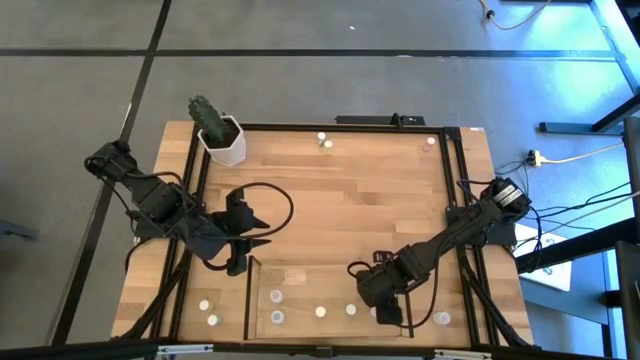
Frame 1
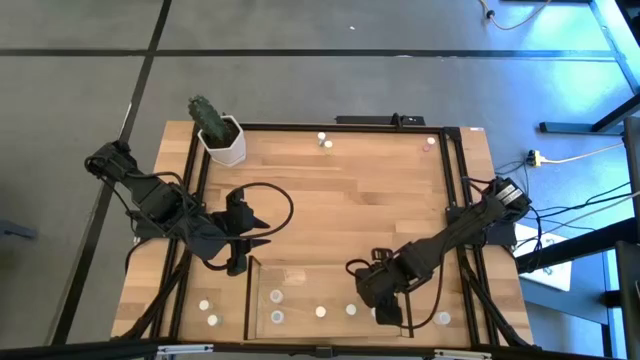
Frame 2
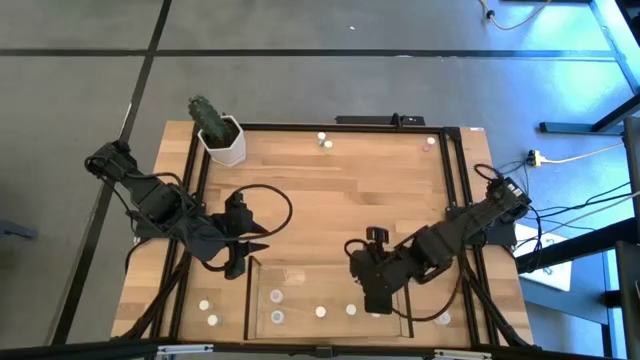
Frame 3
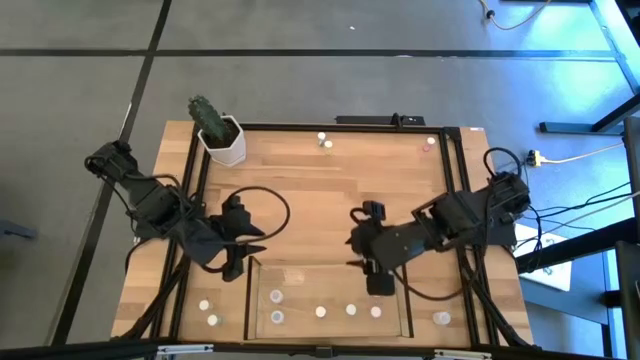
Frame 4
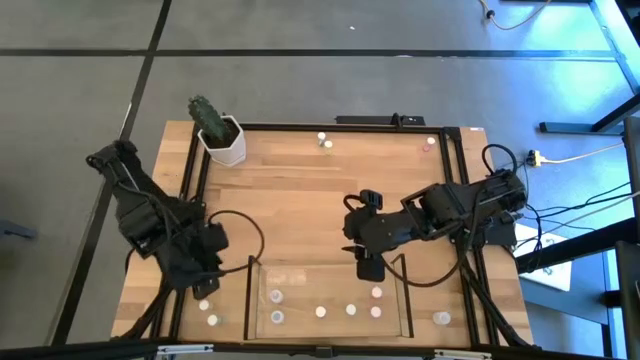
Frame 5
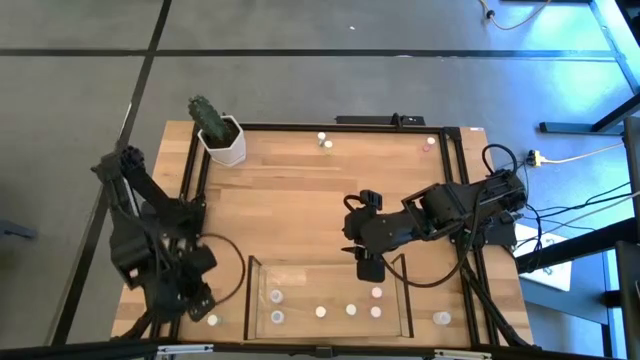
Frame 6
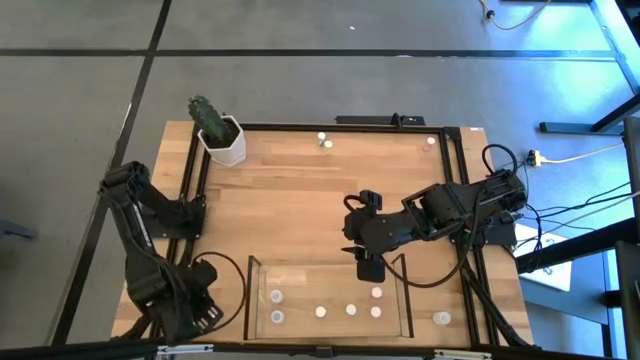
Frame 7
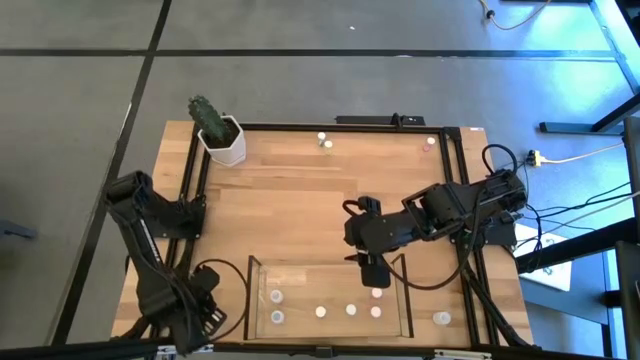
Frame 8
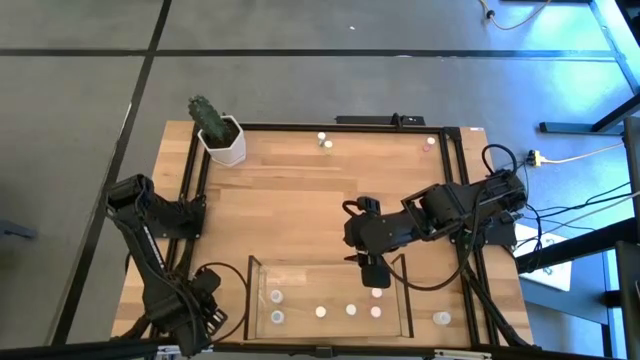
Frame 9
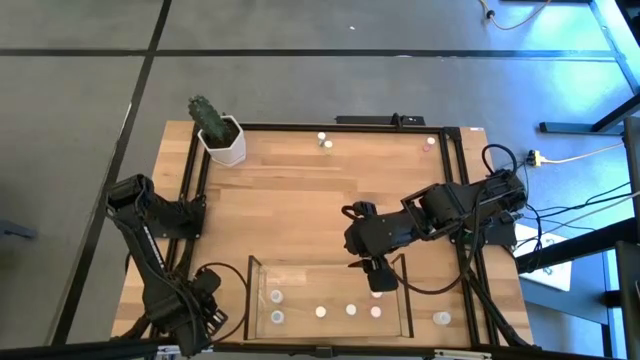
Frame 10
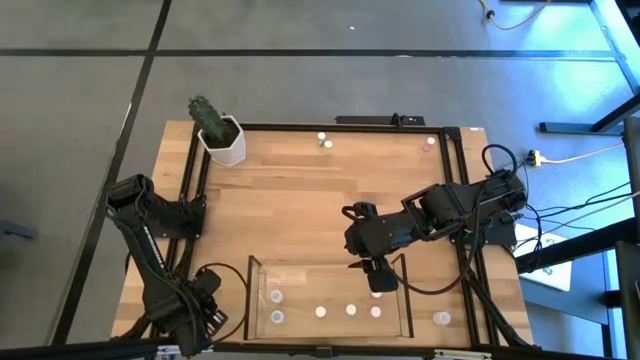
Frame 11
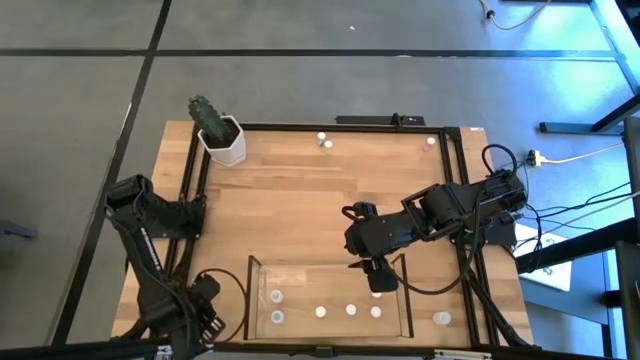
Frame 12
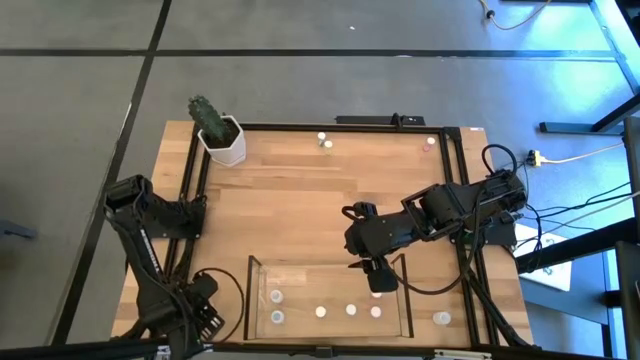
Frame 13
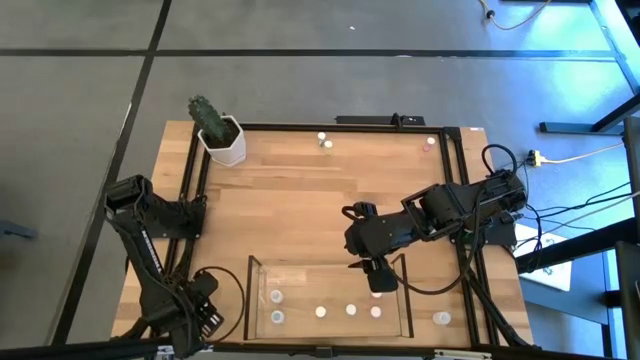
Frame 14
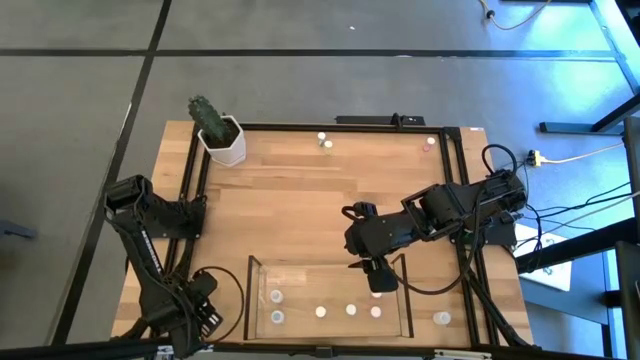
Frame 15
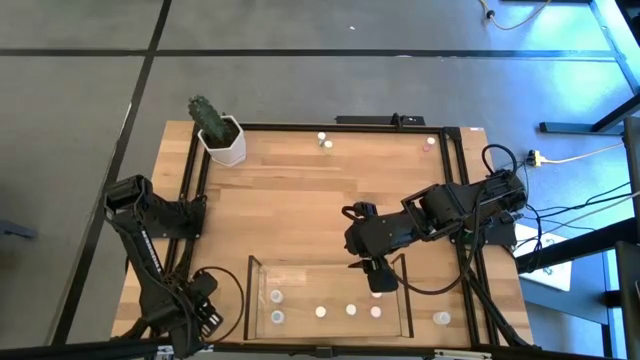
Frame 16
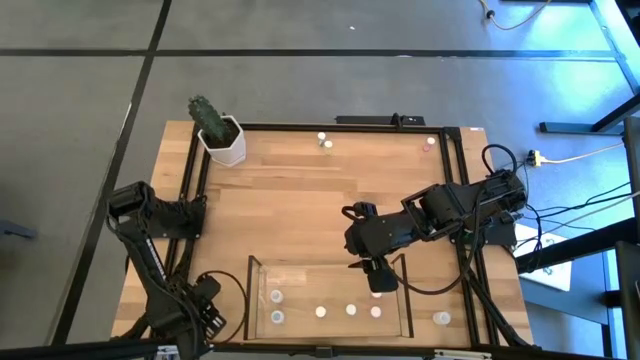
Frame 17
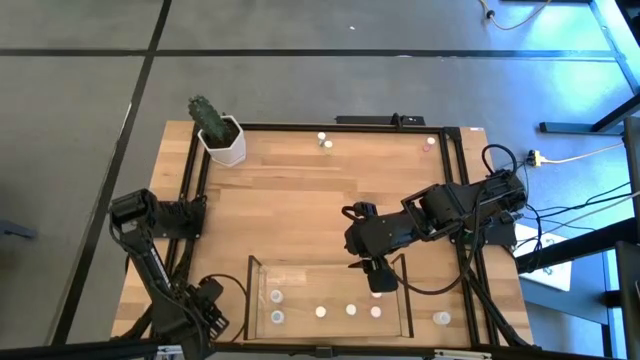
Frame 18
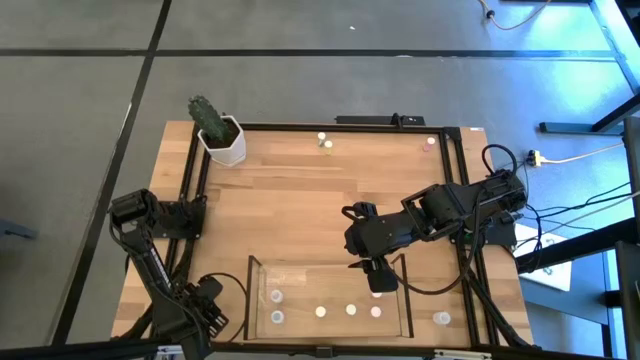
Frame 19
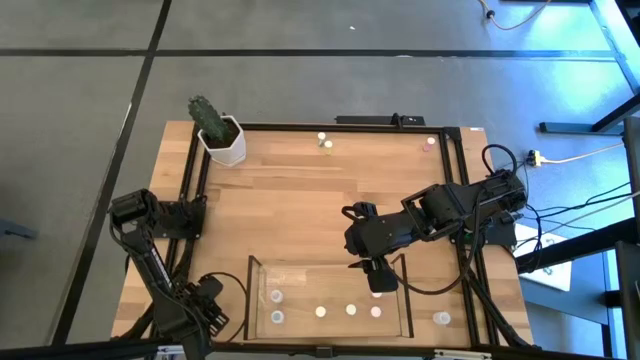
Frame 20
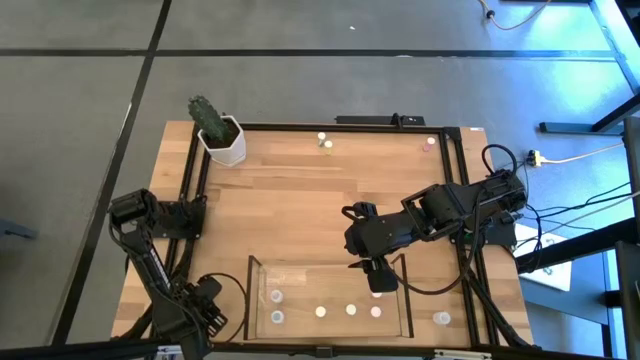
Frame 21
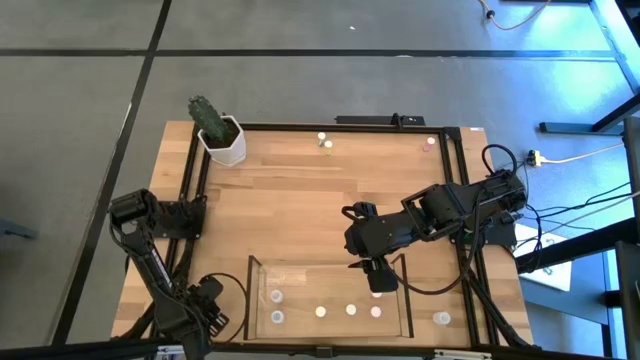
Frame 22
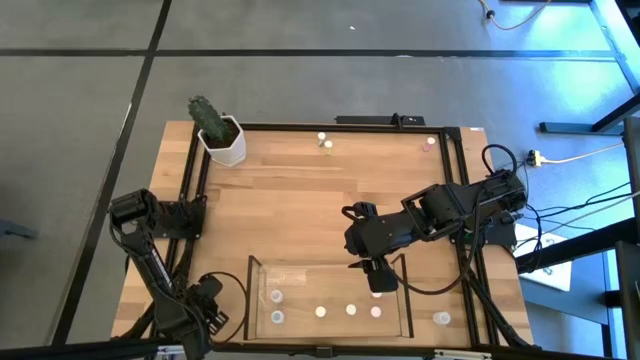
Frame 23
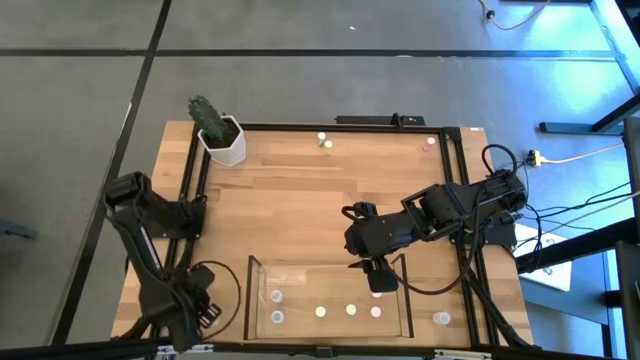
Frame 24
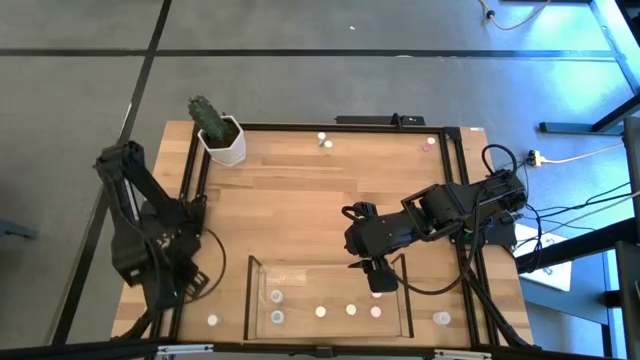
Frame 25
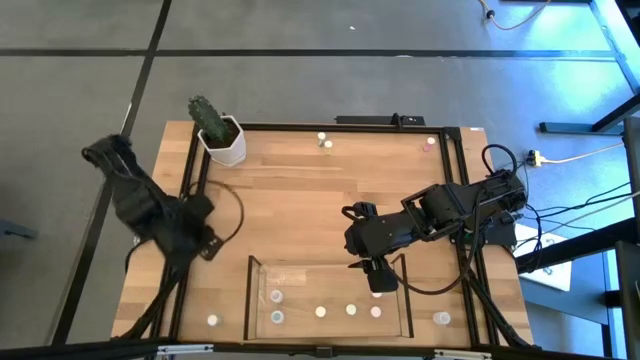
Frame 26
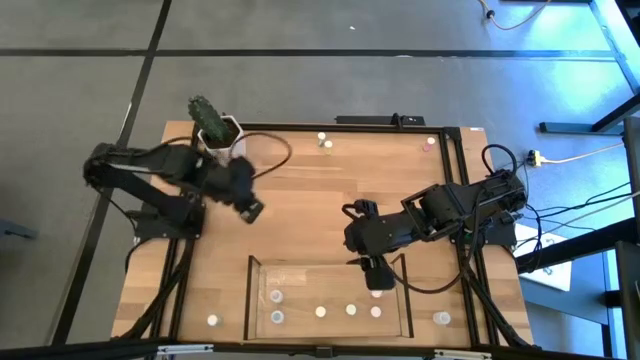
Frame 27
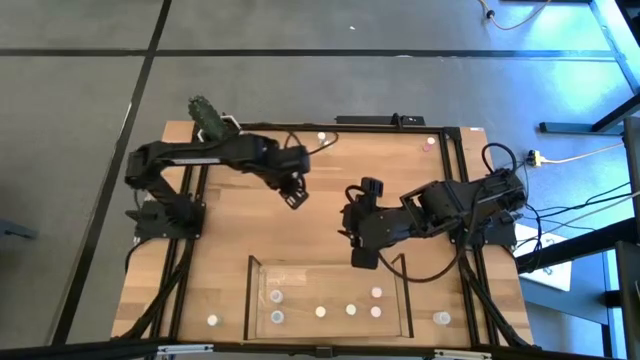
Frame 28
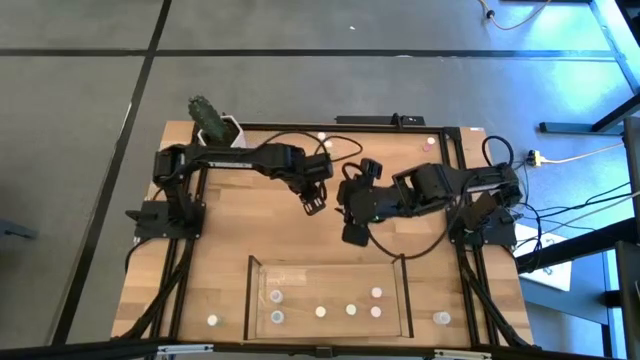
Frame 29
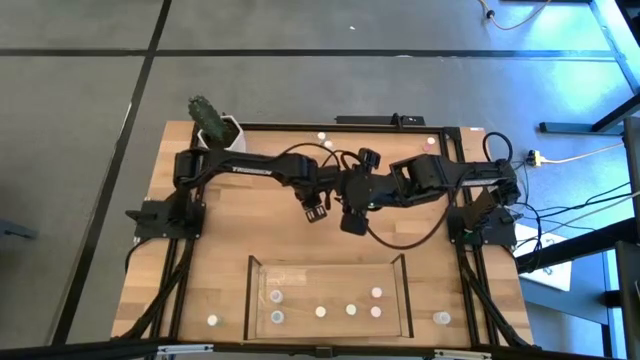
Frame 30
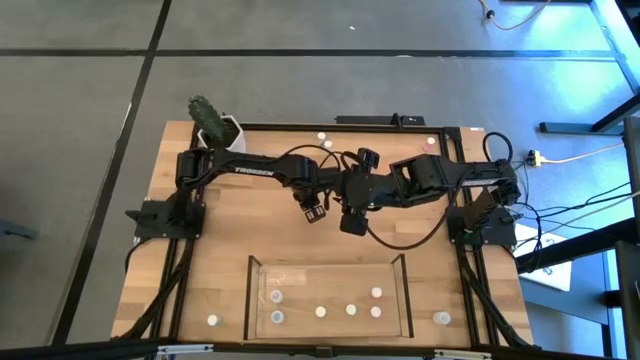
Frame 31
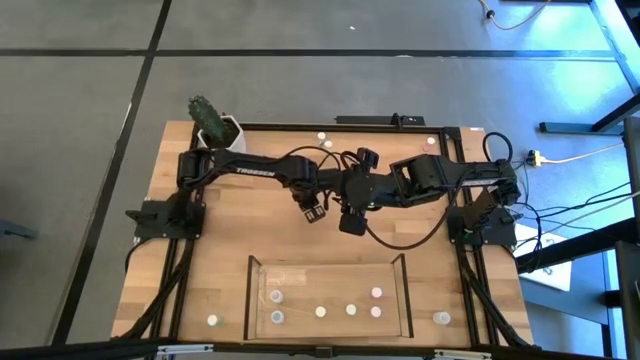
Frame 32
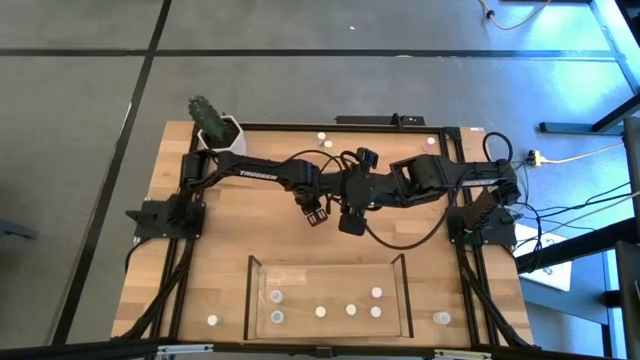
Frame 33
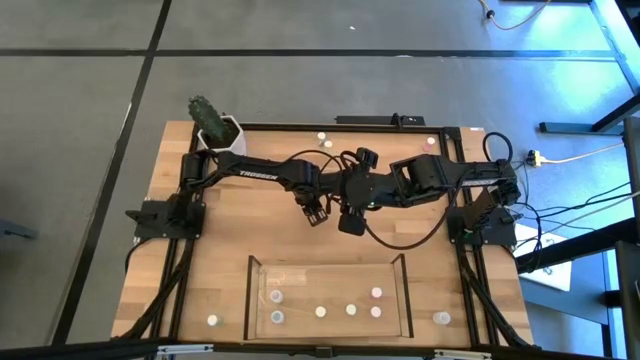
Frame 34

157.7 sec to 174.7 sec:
Task: Pick and place medicine bottles onto shelf by color
Put the bottom yellow pill bottle on the shelf aligned with the other yellow pill bottle

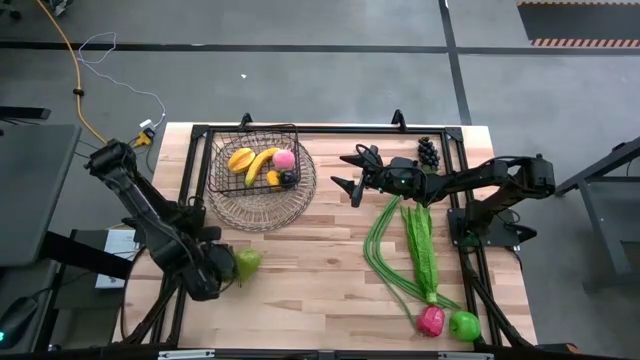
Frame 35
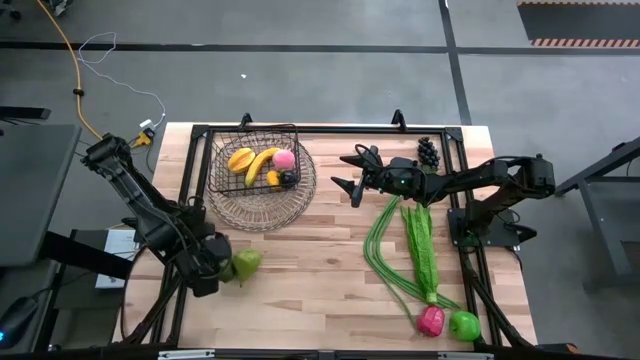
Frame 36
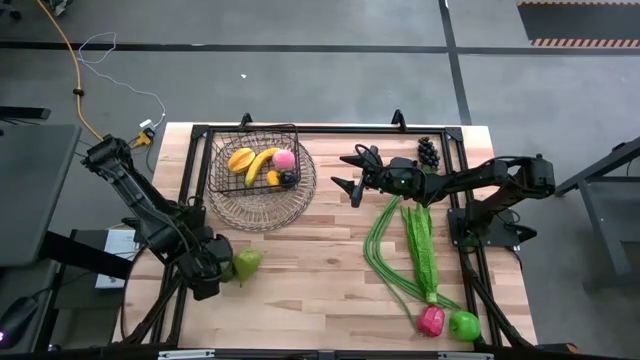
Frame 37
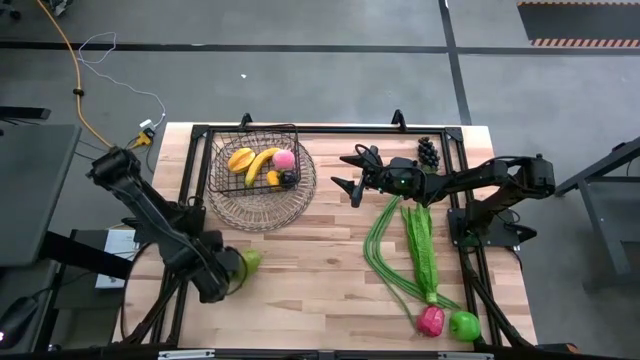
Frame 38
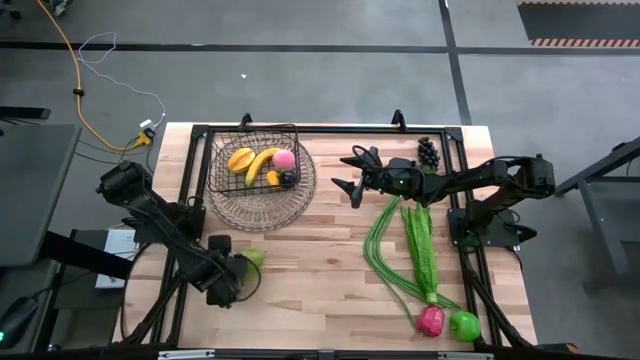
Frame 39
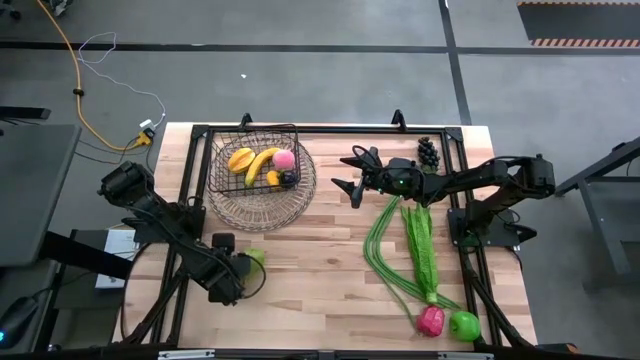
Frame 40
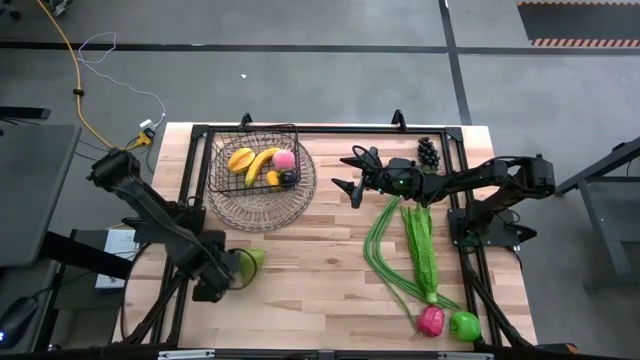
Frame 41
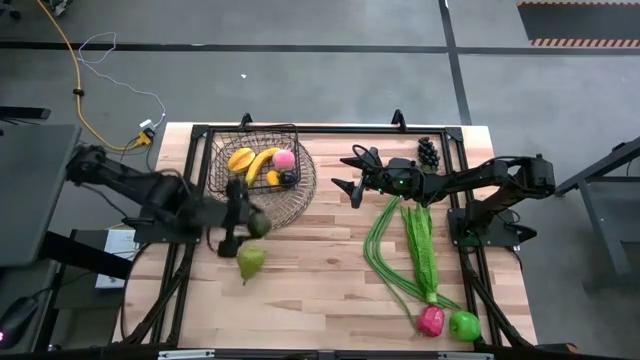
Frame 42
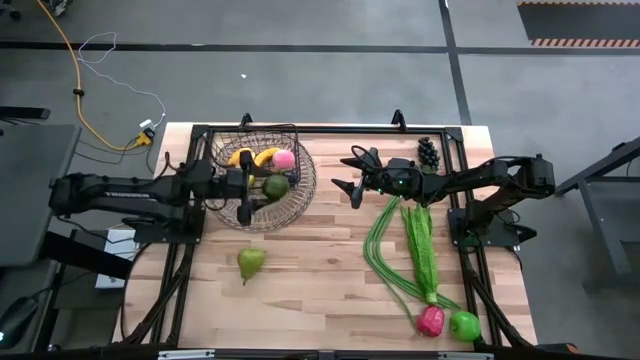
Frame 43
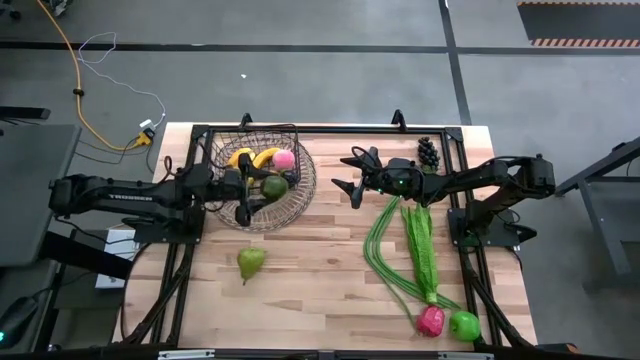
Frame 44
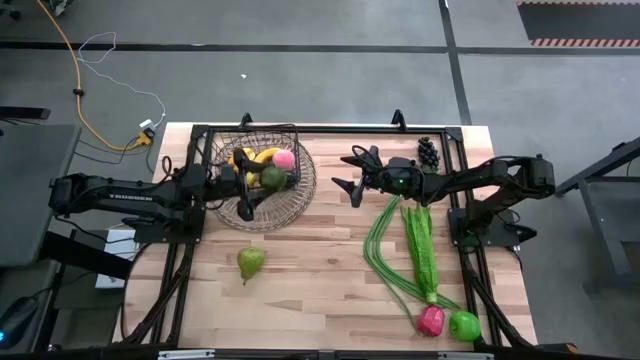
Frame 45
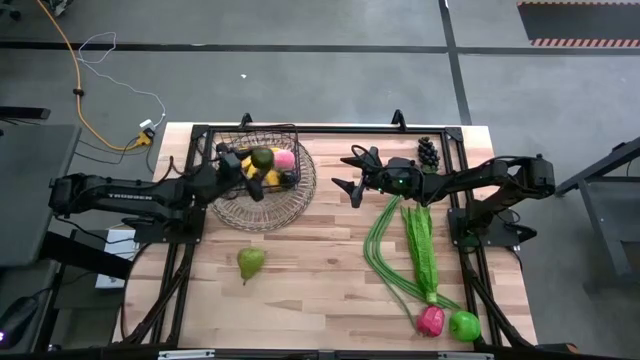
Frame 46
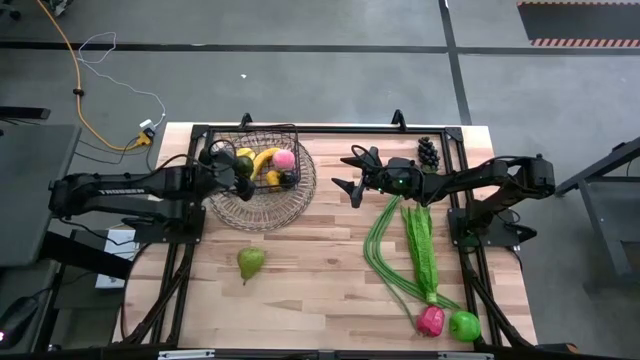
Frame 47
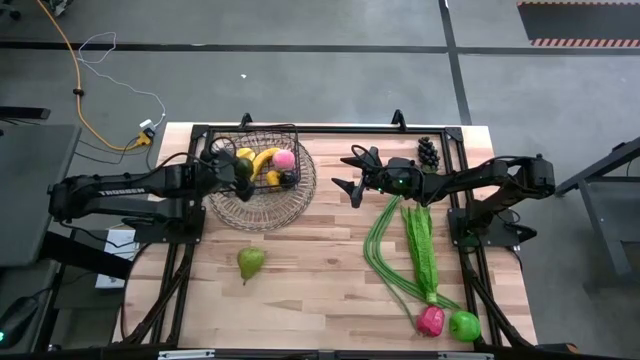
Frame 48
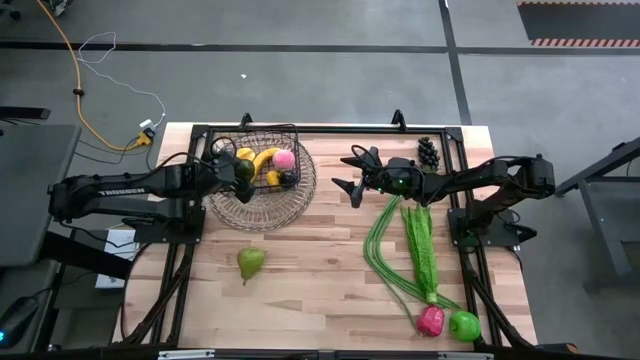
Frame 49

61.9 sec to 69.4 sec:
Task: Build produce basket
Put the green lime into the wire basket
